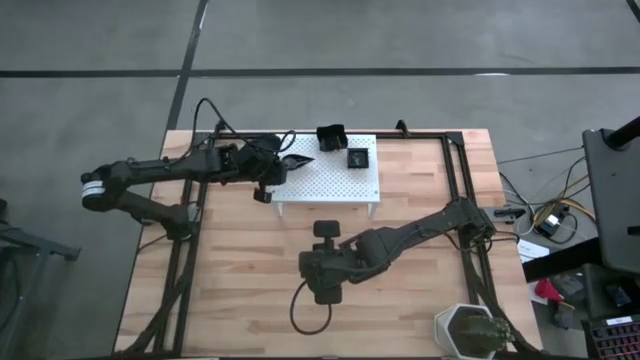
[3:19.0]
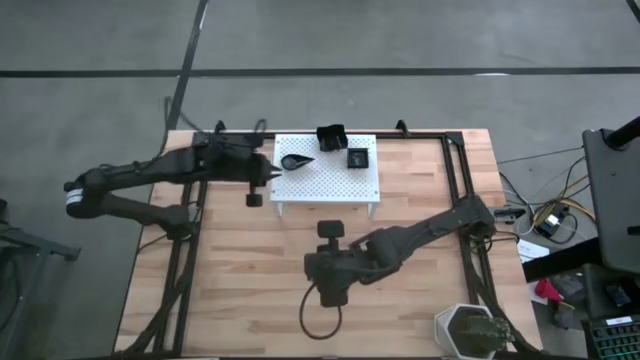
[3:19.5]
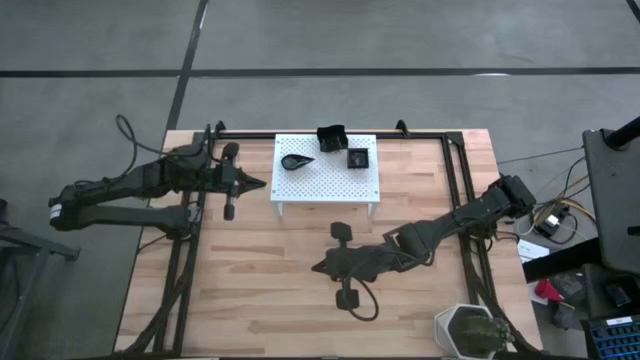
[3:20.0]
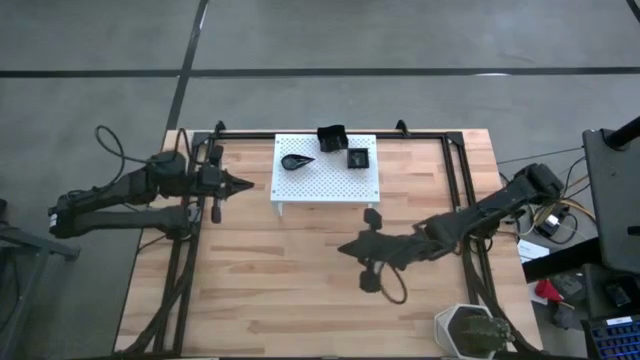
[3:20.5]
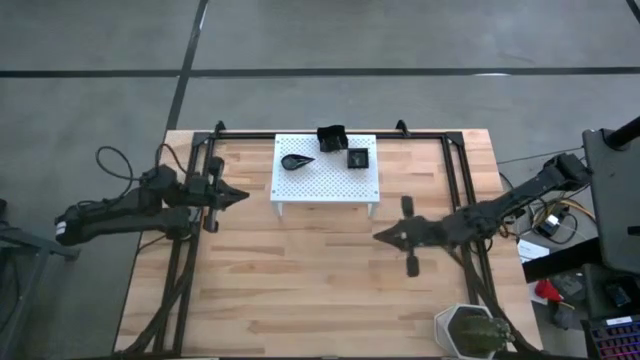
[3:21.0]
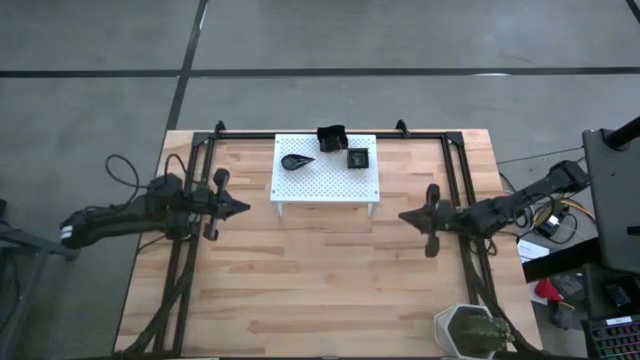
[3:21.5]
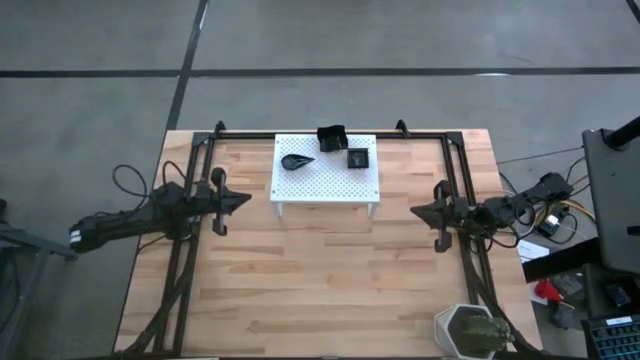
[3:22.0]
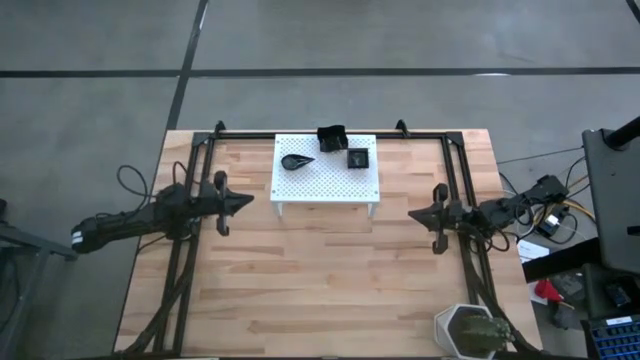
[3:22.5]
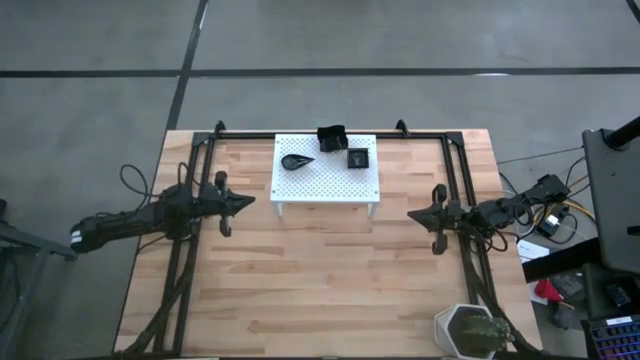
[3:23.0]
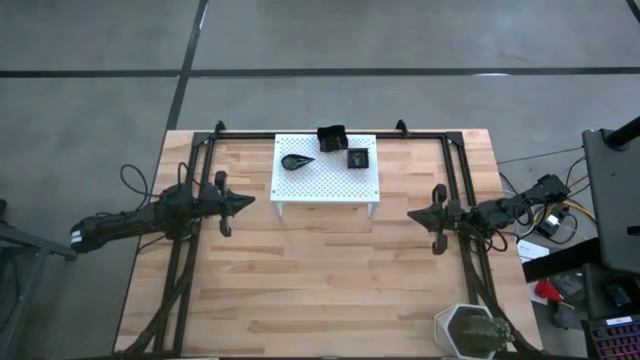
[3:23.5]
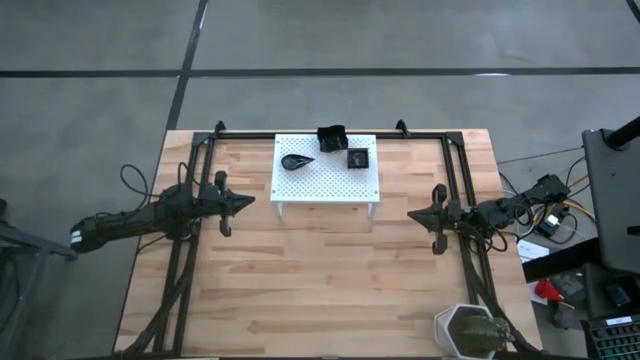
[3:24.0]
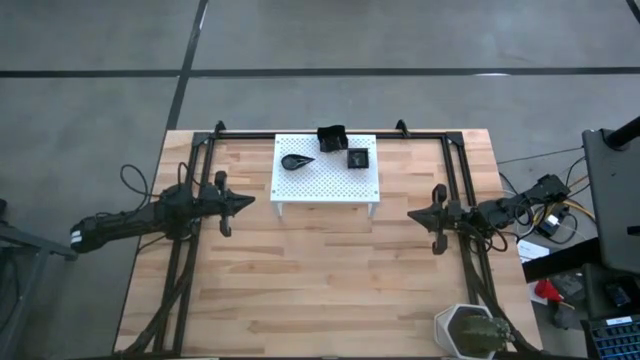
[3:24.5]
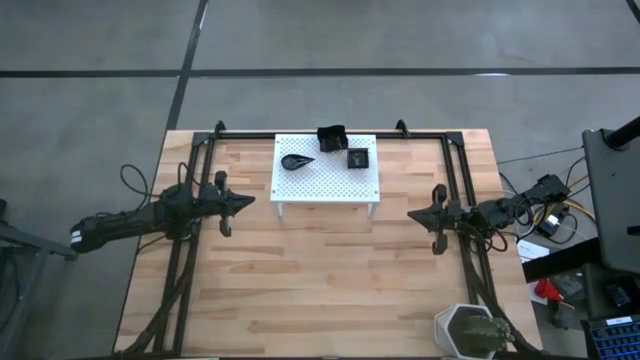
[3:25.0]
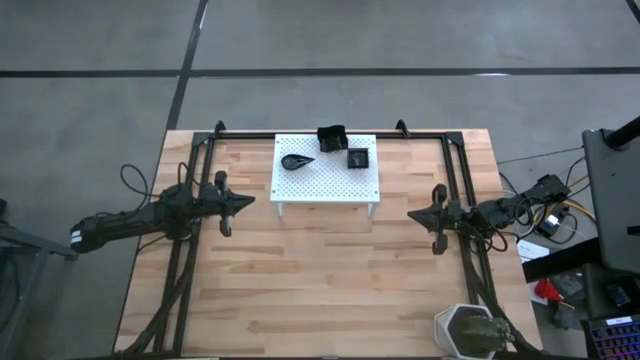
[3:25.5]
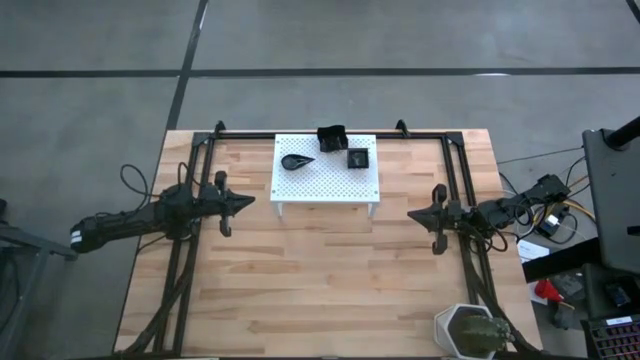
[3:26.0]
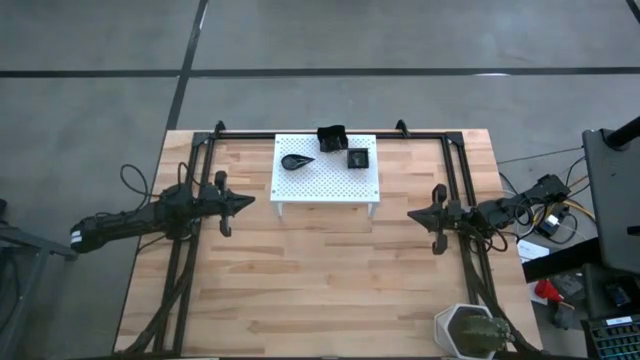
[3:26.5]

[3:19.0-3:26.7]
Task: Pick & Place Mini shaped plates
Return to home position

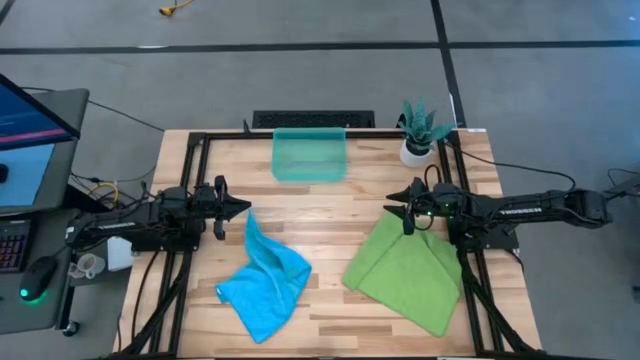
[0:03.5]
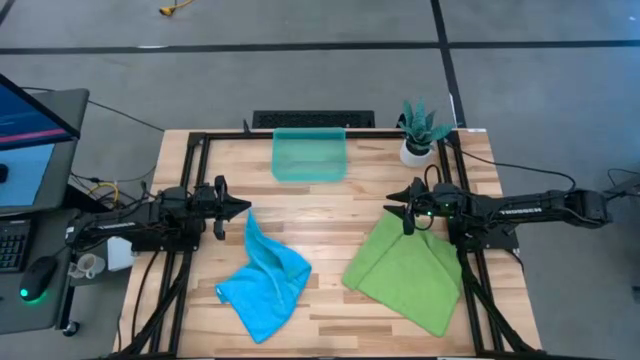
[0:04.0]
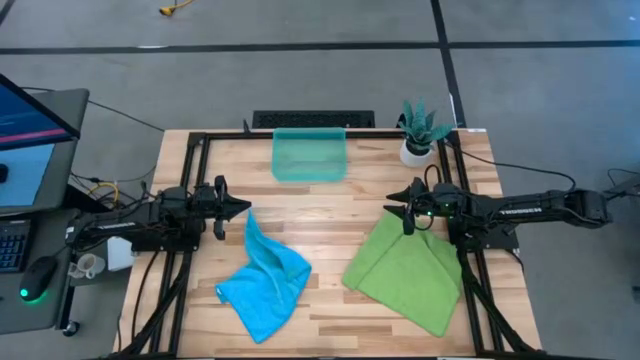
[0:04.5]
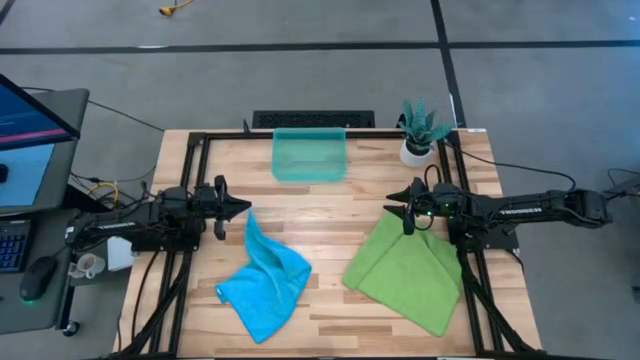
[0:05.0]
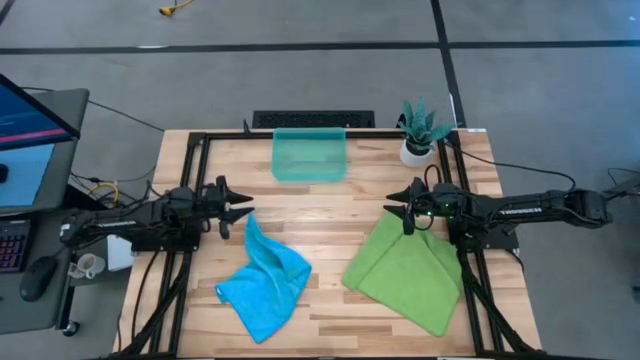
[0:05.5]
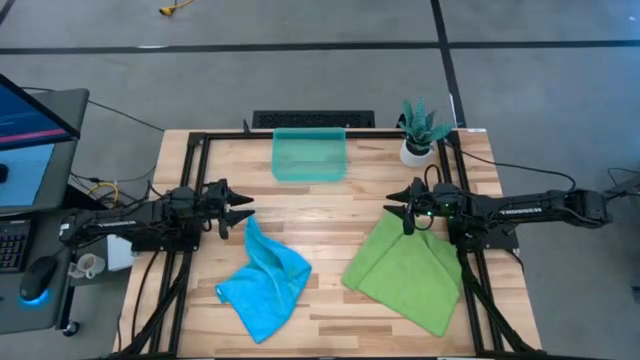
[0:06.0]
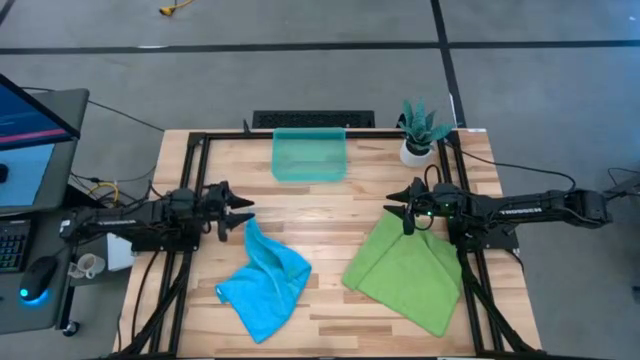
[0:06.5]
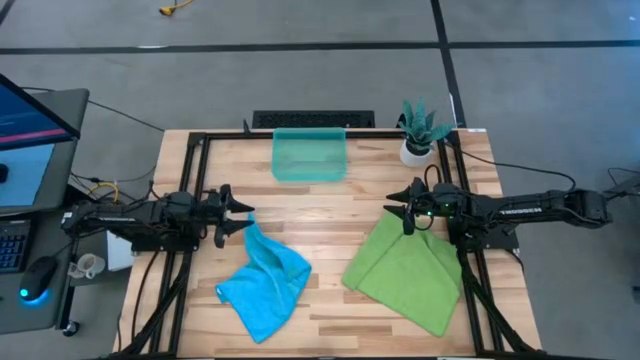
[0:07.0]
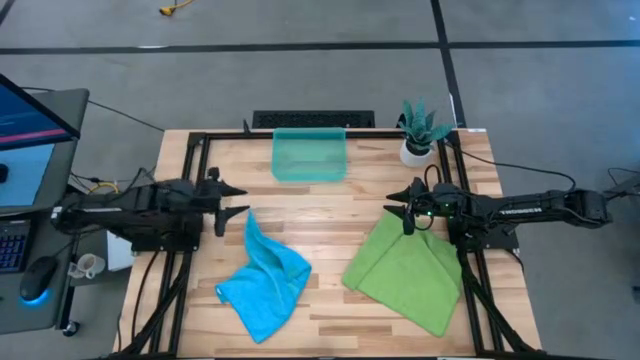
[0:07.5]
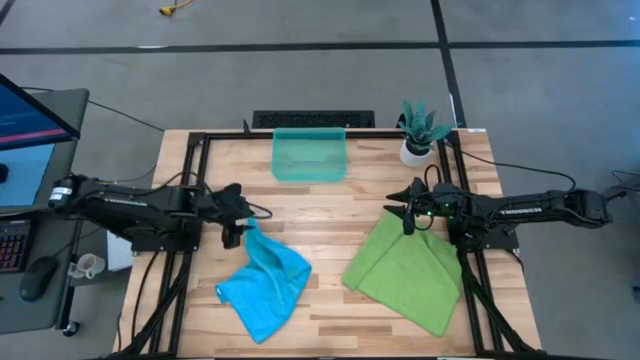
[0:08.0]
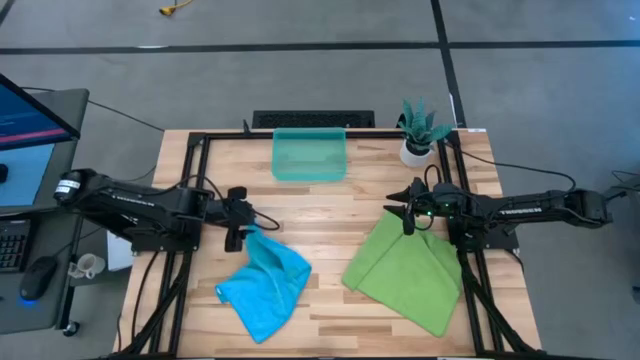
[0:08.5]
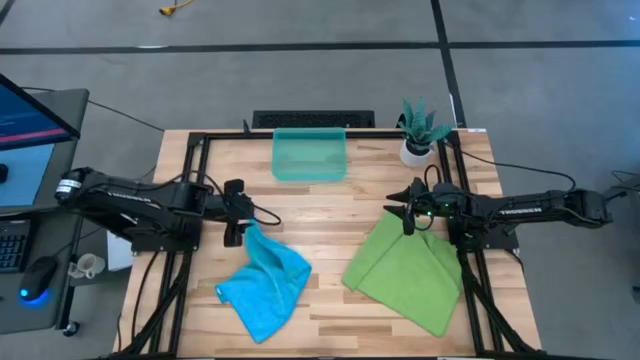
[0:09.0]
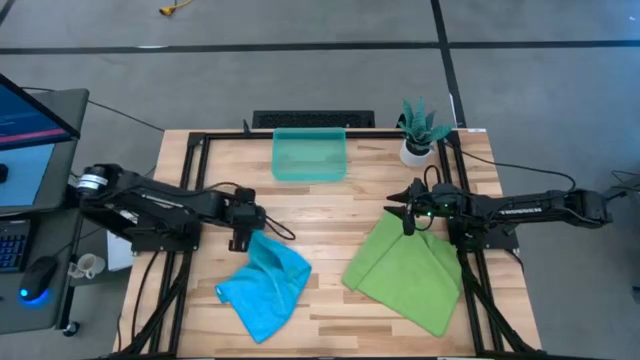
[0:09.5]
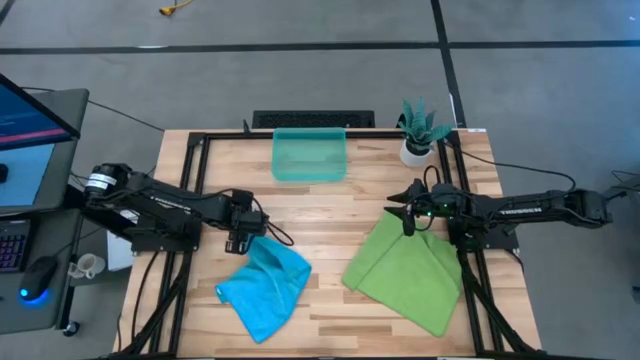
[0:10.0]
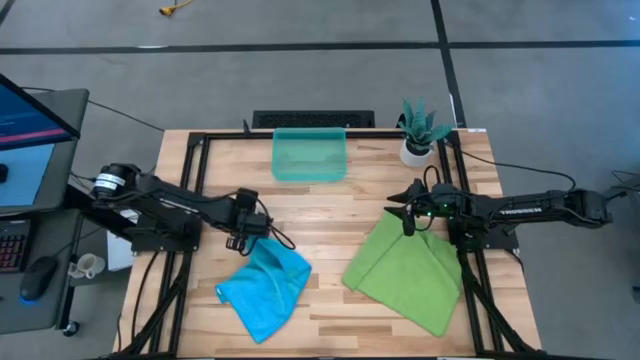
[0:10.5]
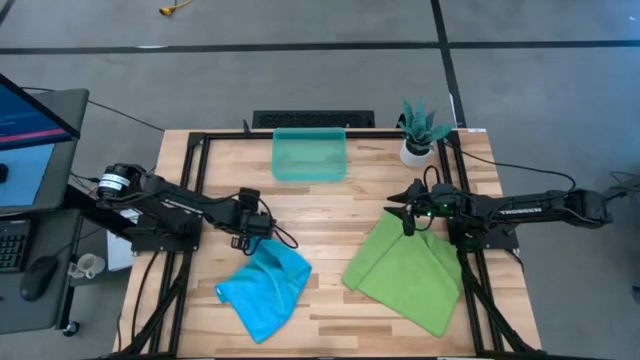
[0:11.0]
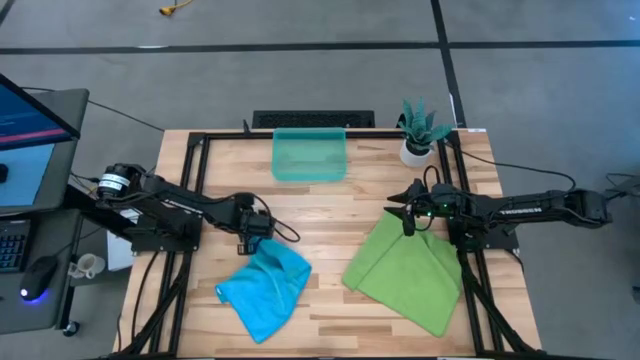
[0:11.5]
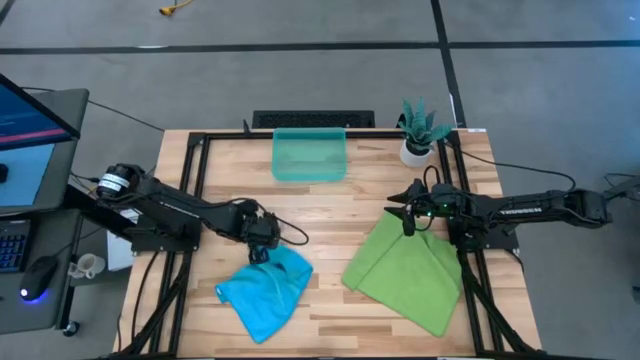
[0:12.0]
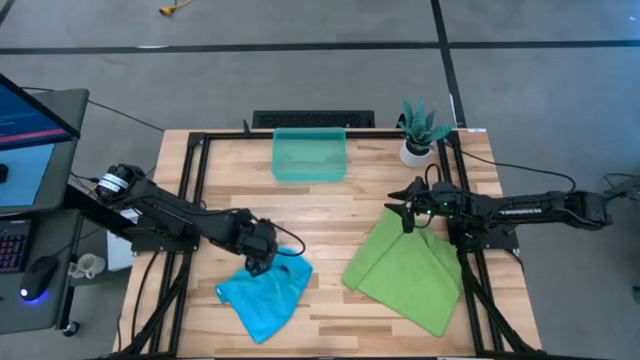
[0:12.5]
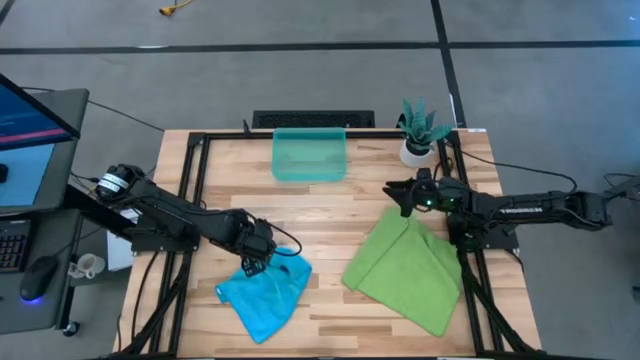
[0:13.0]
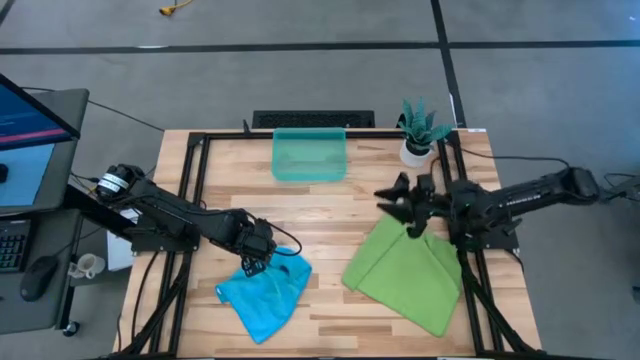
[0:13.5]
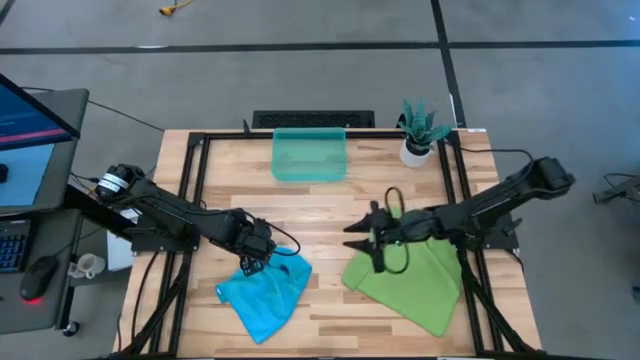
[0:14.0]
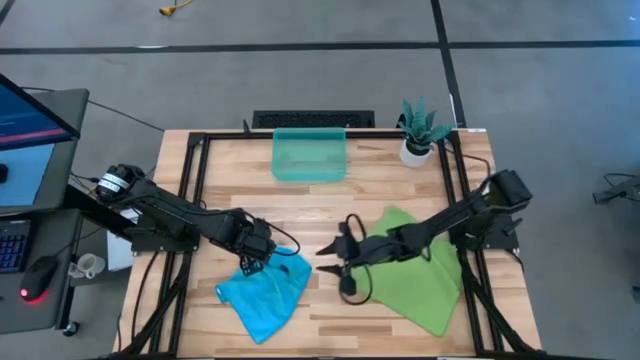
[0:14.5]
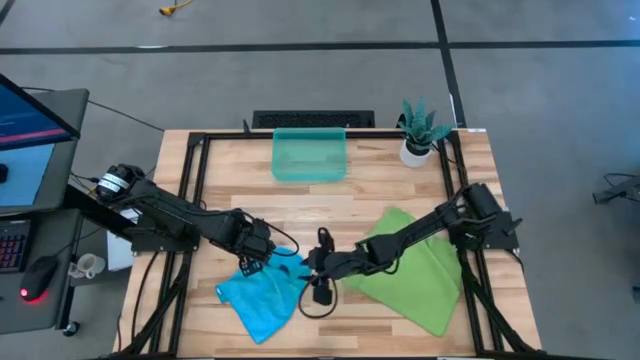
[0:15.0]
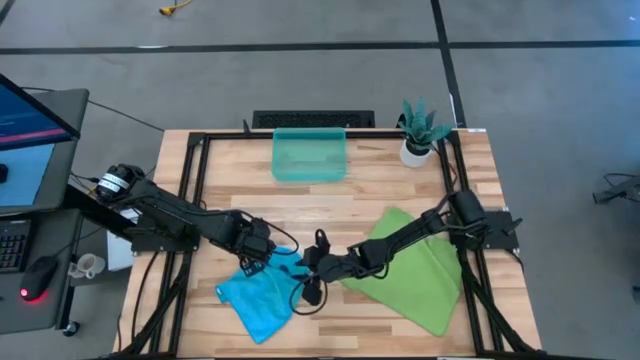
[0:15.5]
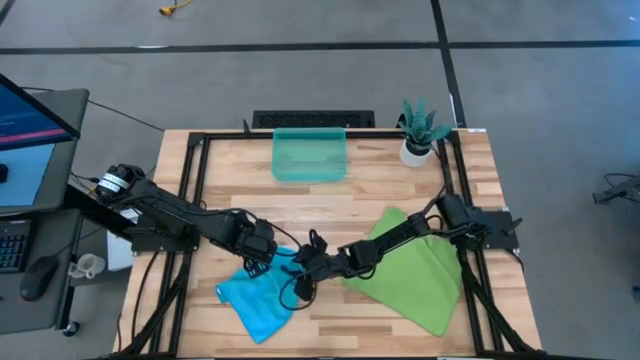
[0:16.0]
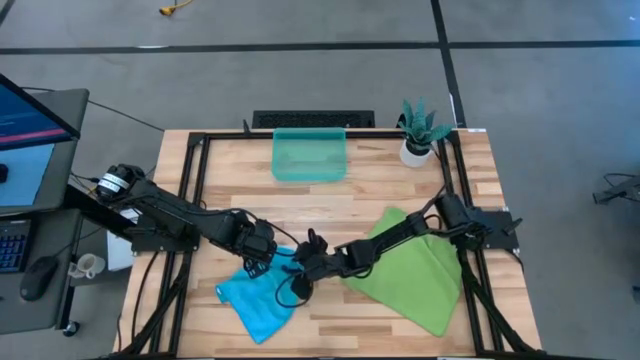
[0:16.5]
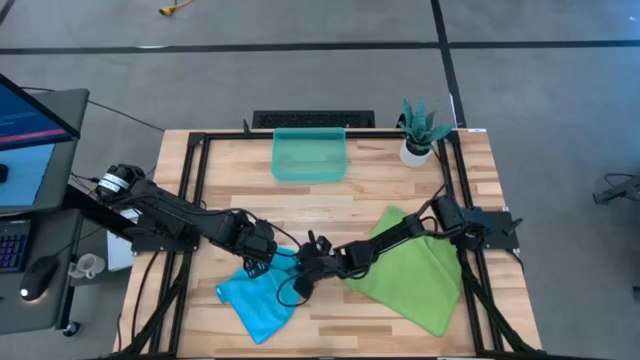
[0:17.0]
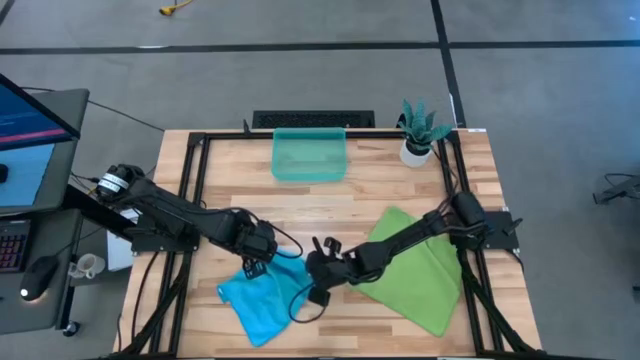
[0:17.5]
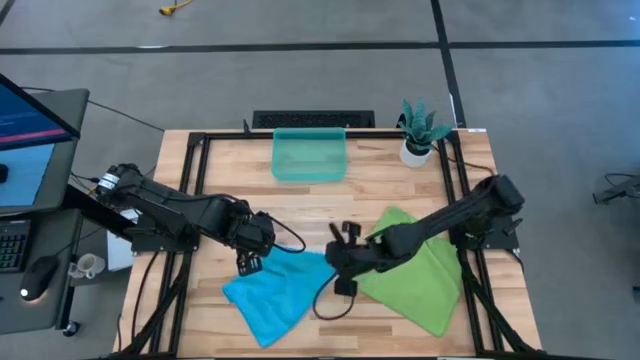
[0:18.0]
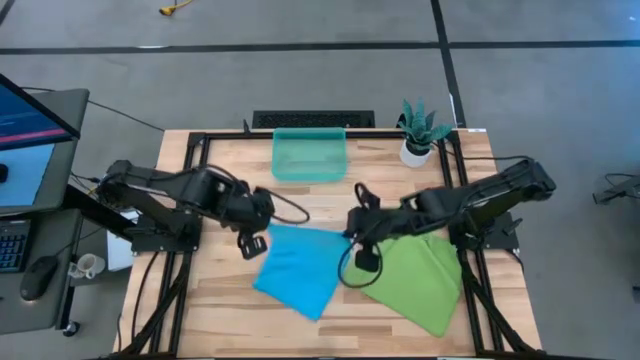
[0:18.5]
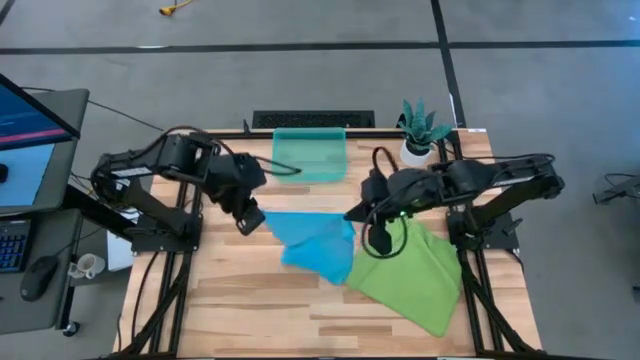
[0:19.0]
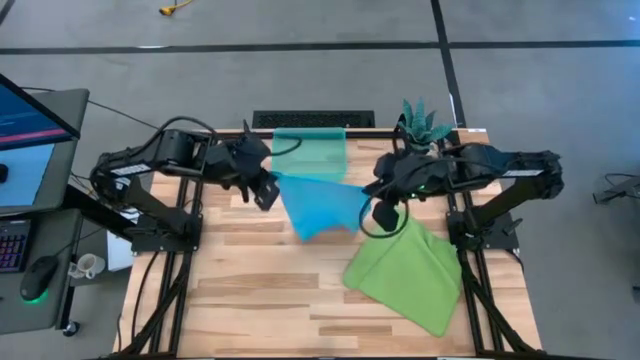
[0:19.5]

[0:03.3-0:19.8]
Task: Roll microfiber towels into tight, uniform cylinder then place into a basket
Fold the blue microfiber cloth
